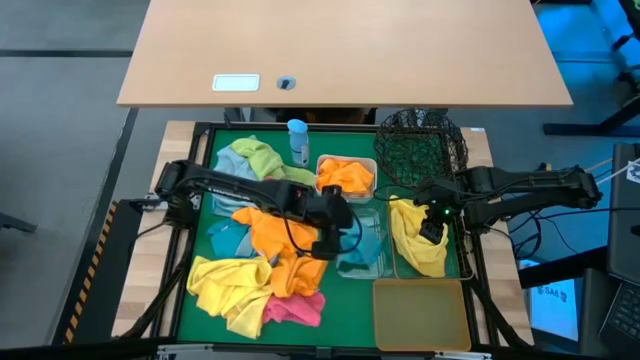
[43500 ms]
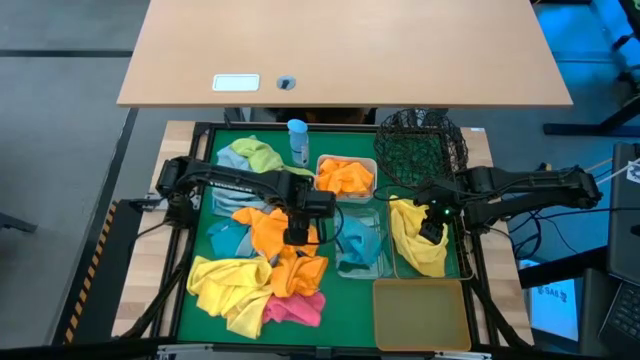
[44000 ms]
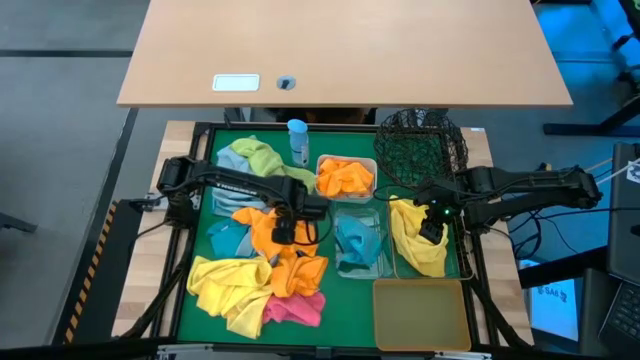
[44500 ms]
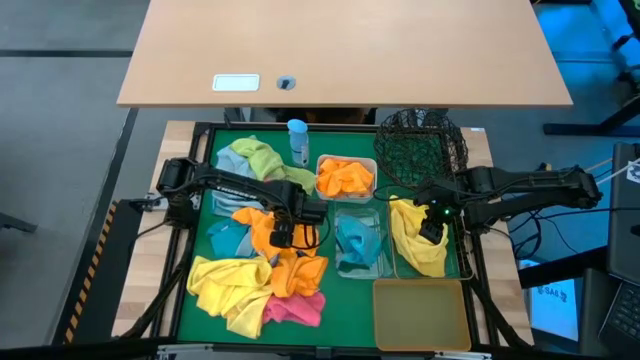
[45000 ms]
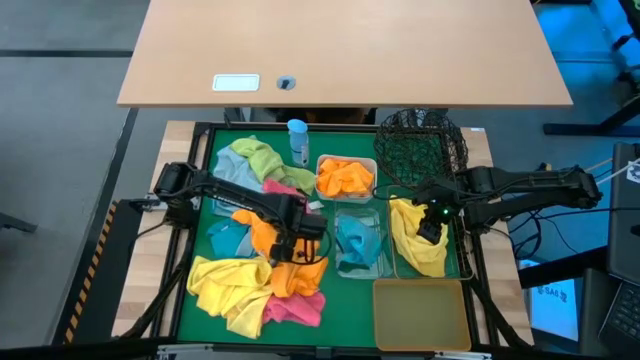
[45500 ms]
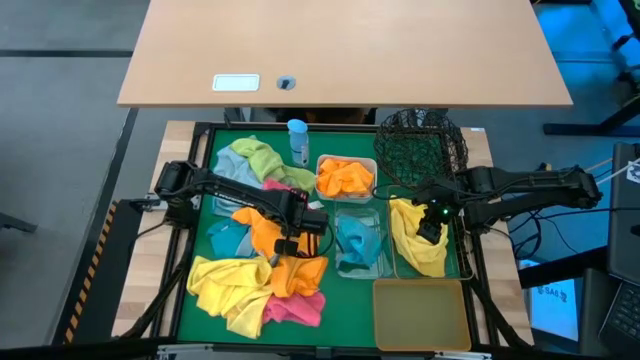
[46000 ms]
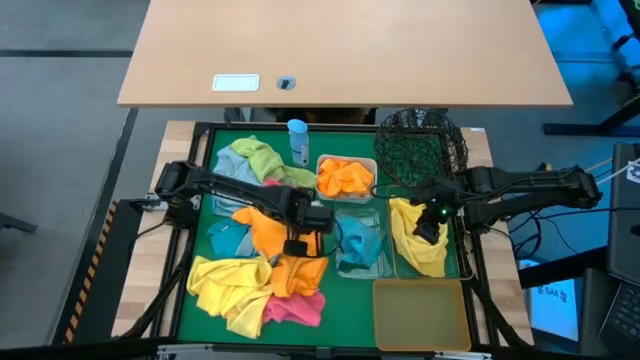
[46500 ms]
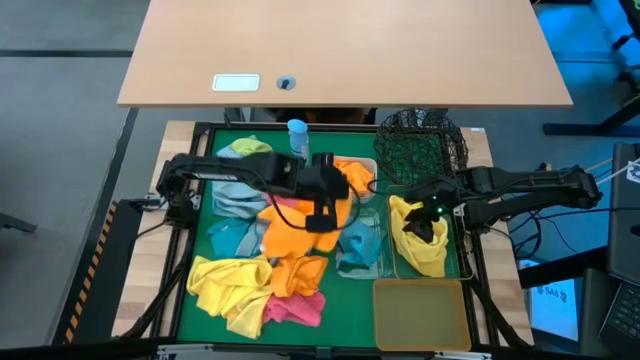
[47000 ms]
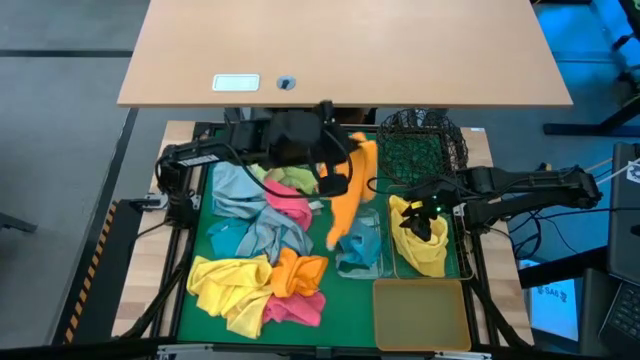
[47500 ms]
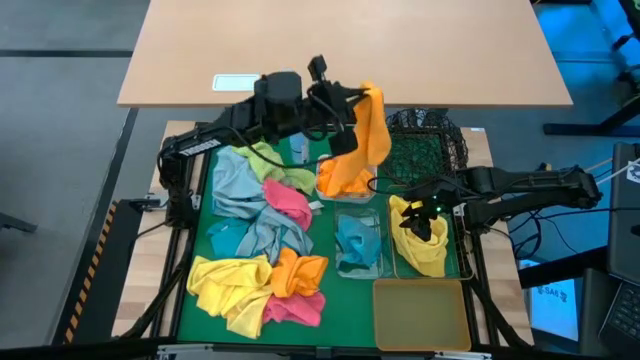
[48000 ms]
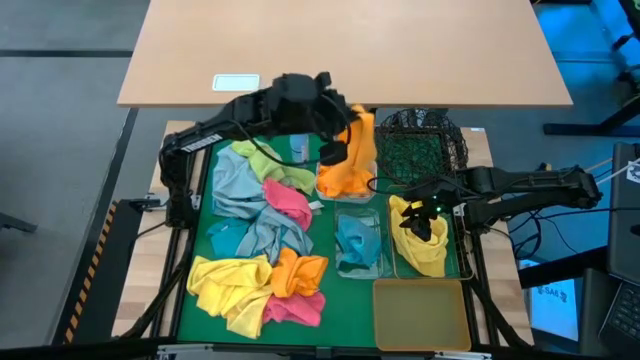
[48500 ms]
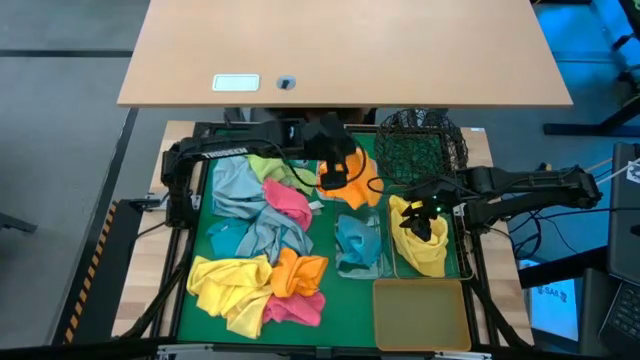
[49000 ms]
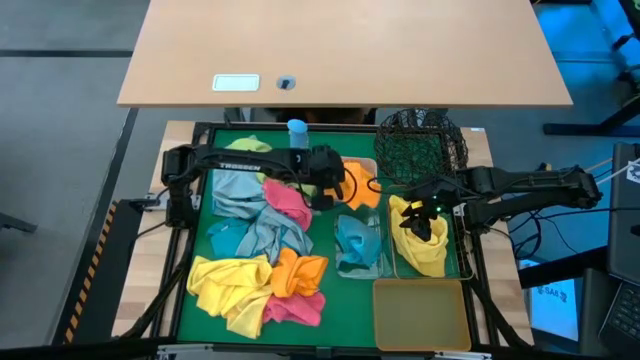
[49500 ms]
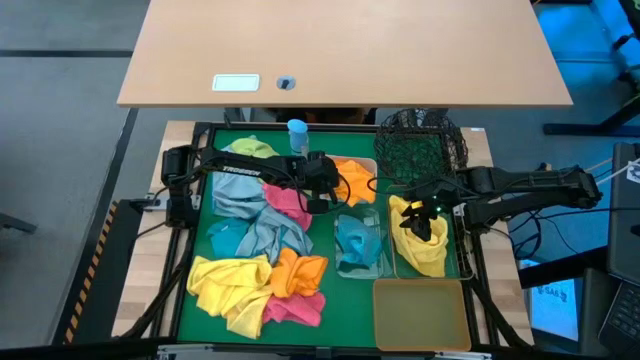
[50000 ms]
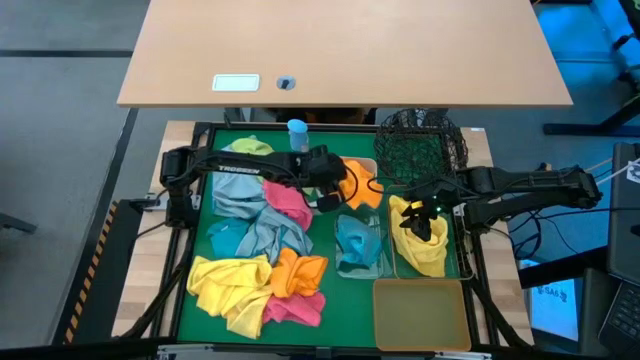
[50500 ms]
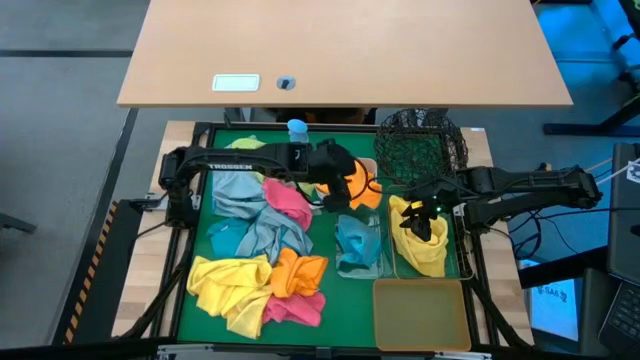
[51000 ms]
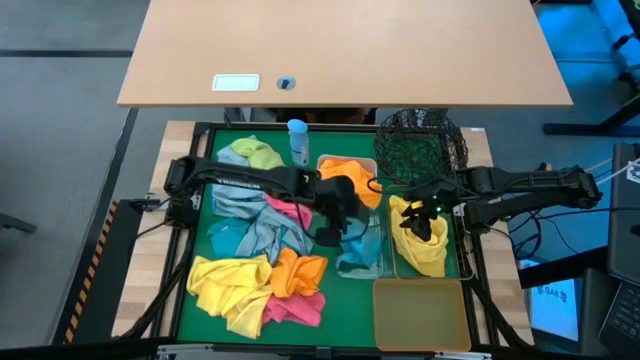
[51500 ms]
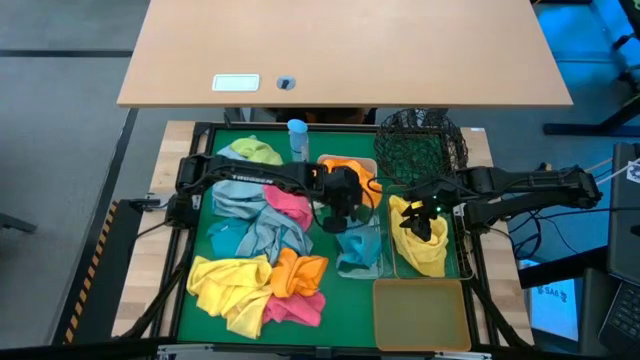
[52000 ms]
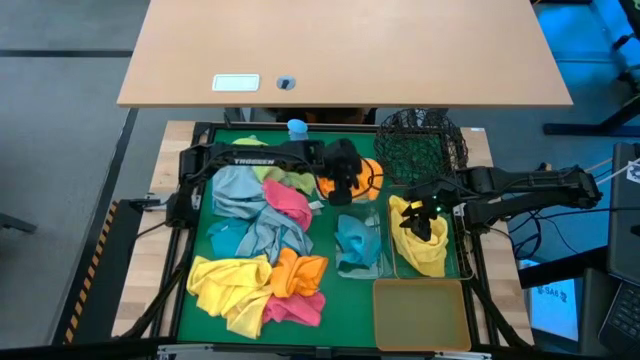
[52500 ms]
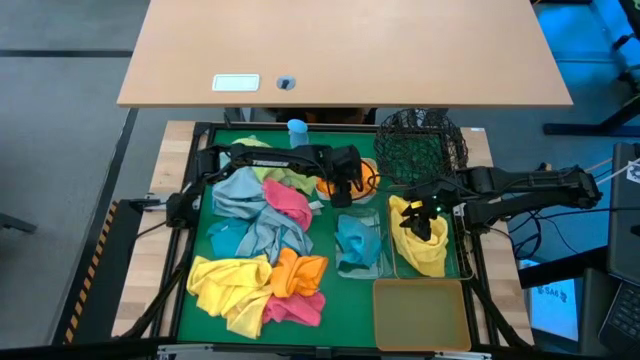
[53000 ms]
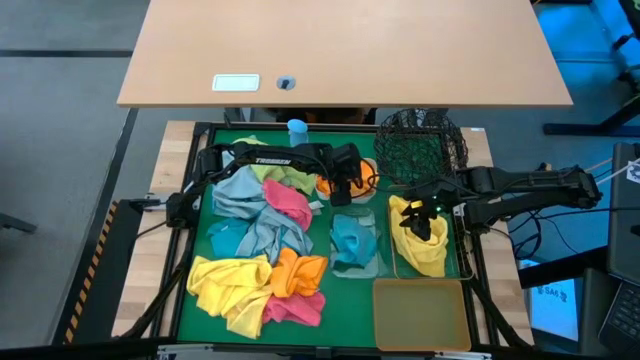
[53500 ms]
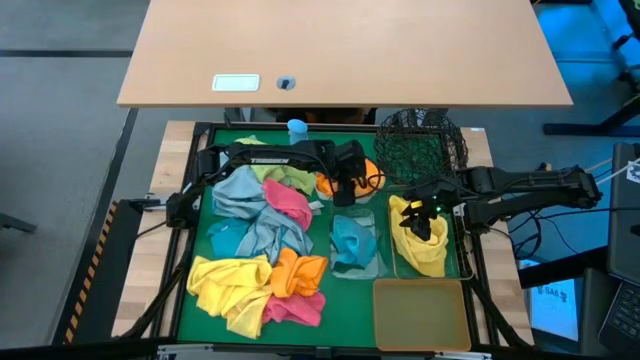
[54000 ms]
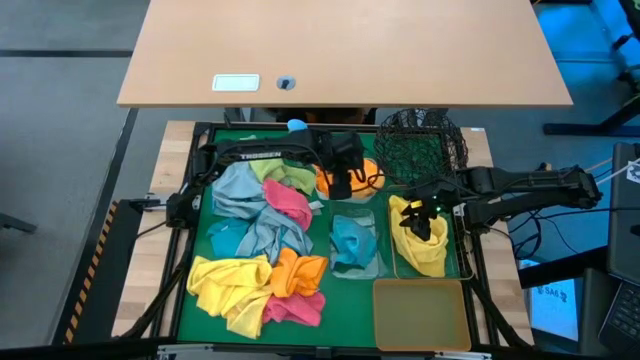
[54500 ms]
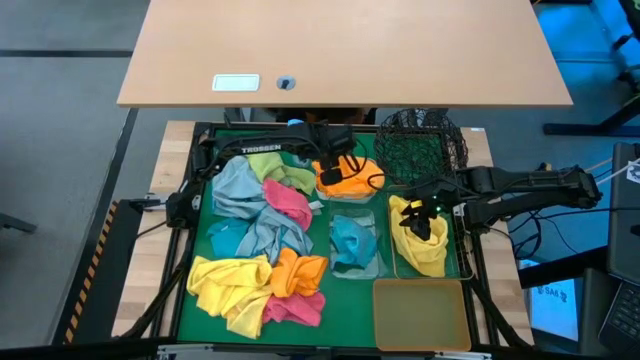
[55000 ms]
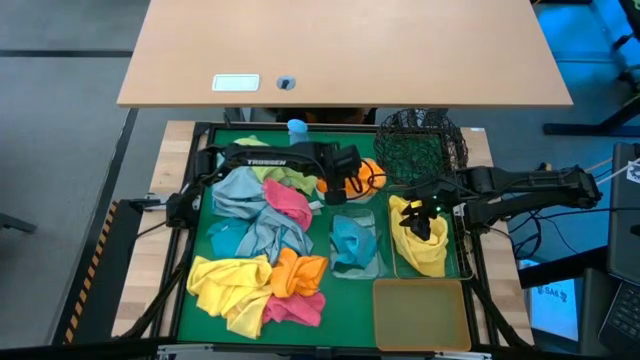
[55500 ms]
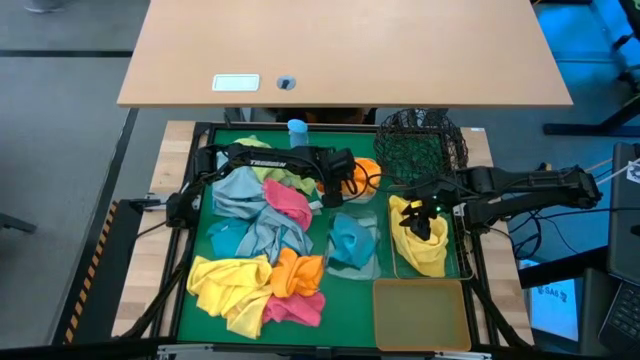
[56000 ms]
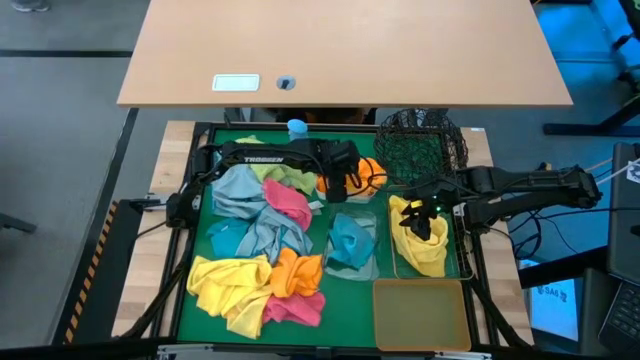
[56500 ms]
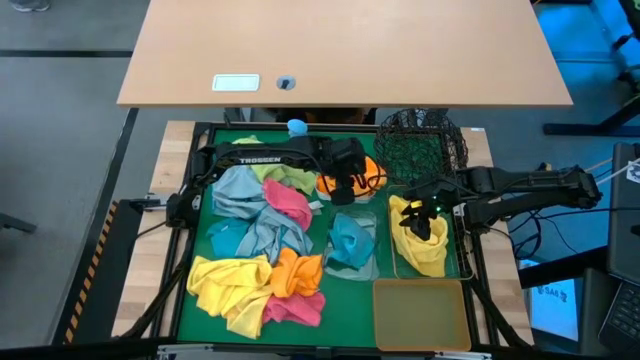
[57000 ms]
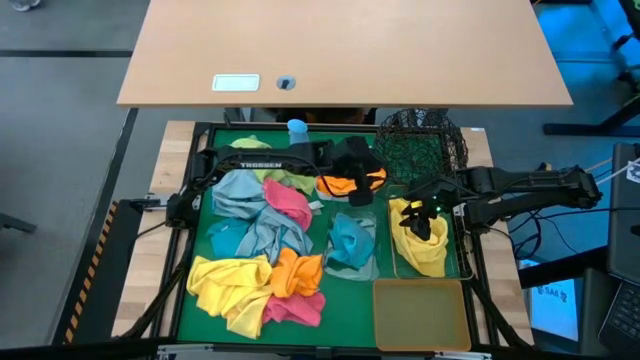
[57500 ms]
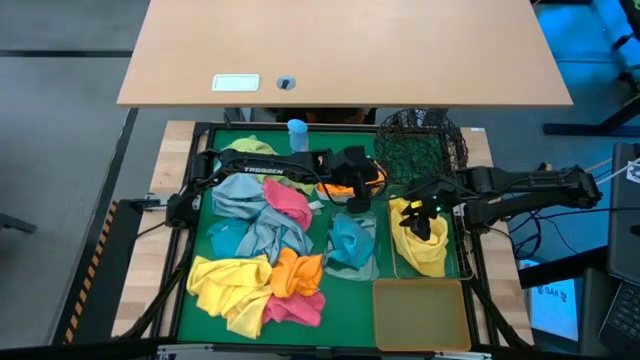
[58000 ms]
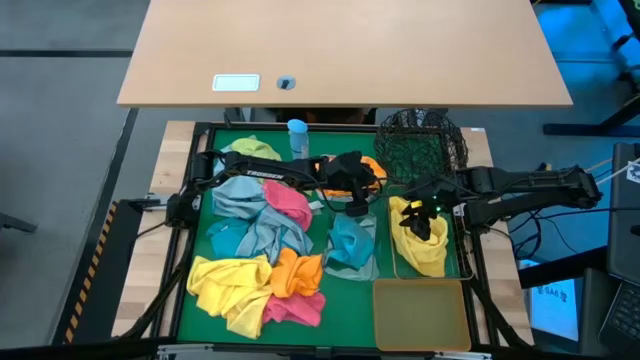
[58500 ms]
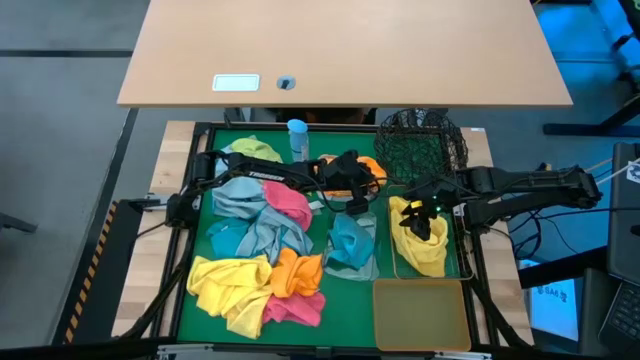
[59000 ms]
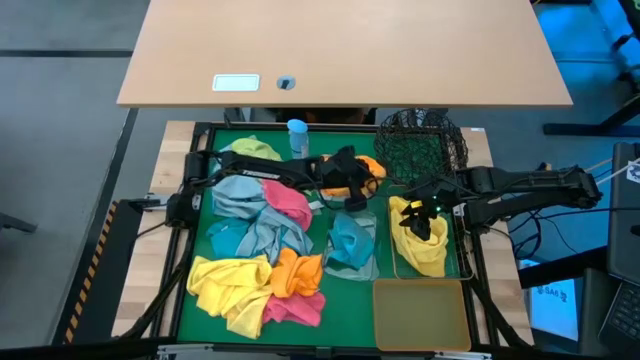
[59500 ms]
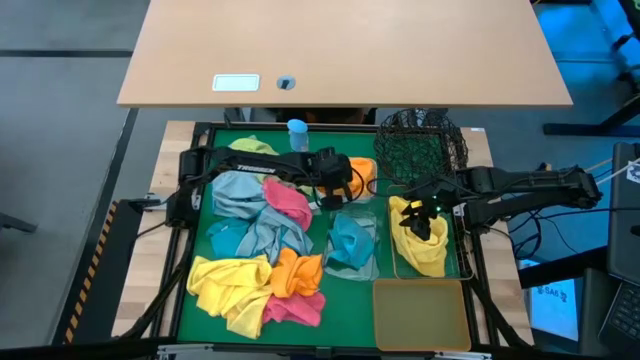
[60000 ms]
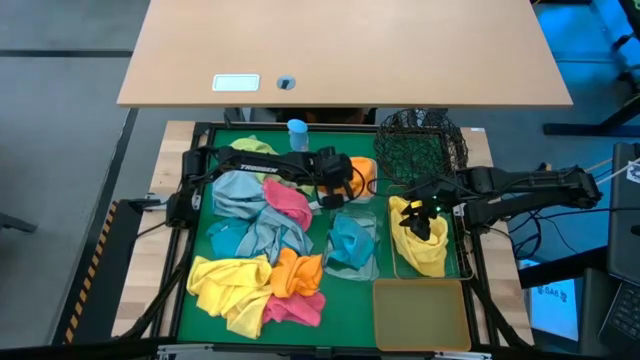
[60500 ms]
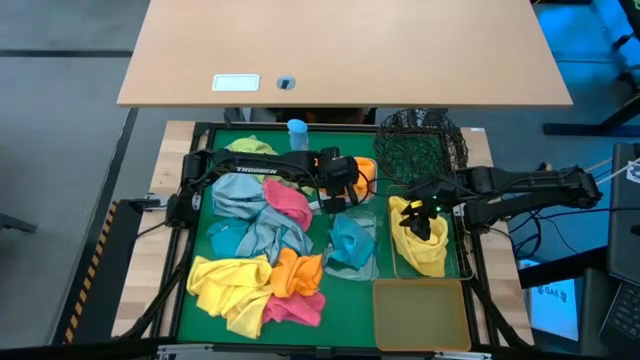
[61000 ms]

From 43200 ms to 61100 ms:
Task: Sort microfiber towel by color & place in baskets
Put the orange towel into the white bin

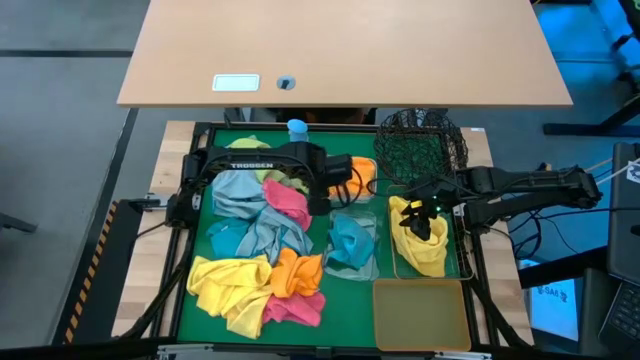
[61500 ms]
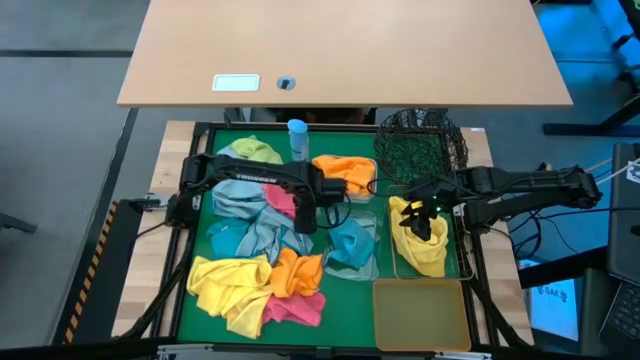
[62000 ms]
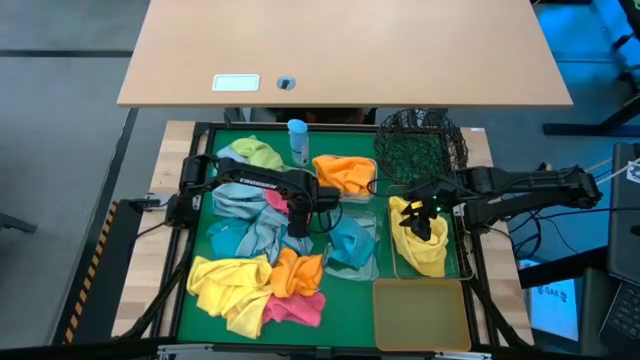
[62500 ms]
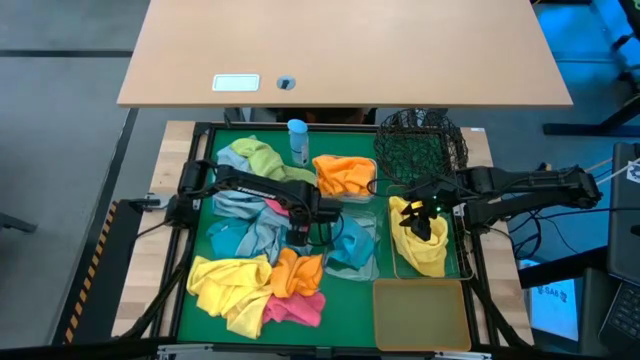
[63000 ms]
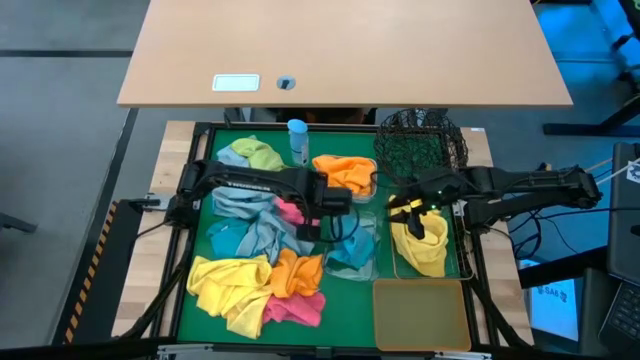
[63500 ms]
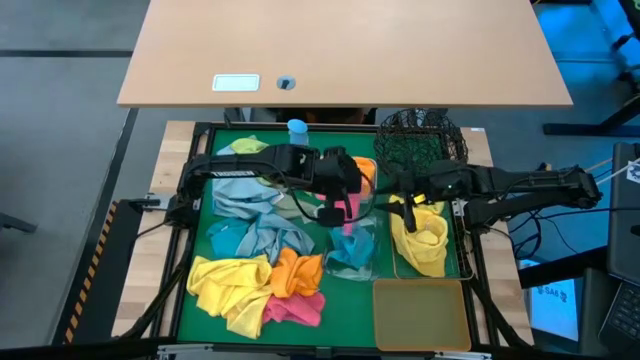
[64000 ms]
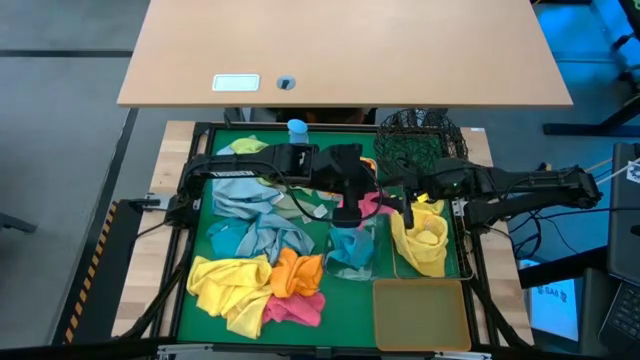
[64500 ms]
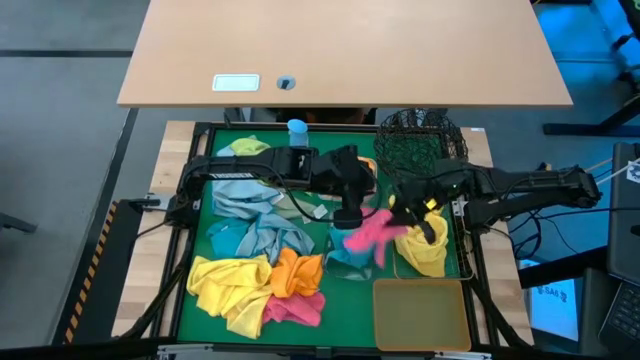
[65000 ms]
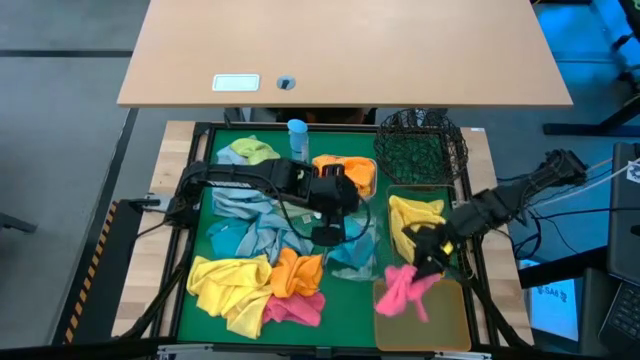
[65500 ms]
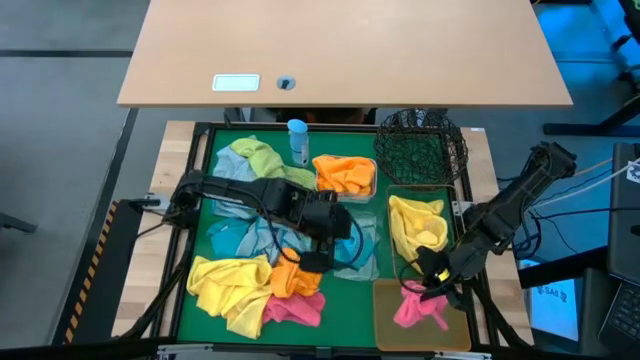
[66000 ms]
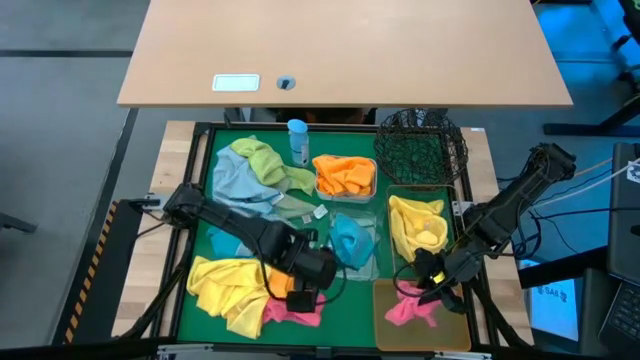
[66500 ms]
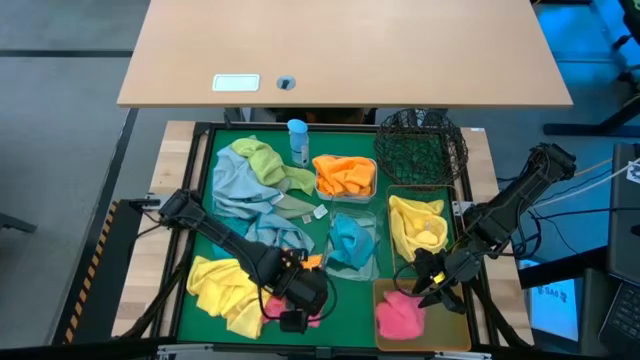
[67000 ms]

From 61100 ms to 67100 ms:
Put the pink towel into the orange bin
